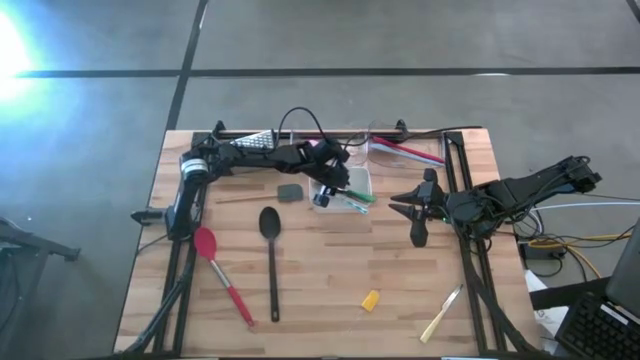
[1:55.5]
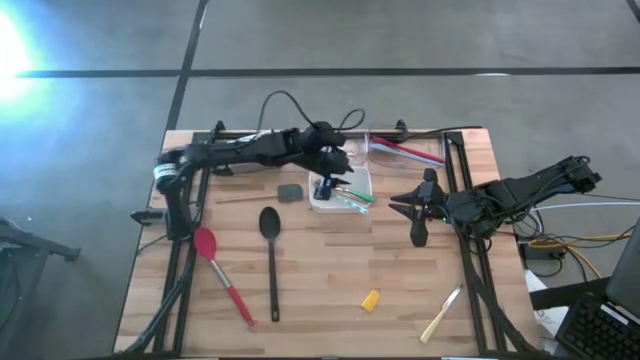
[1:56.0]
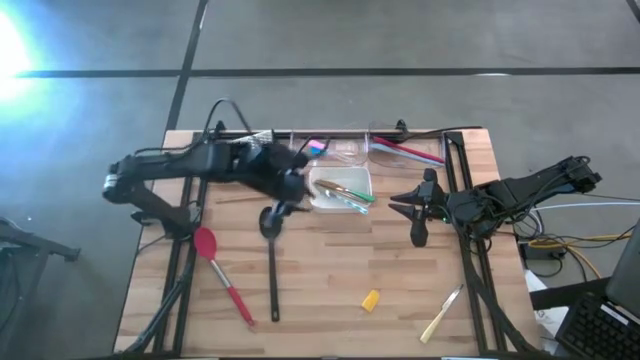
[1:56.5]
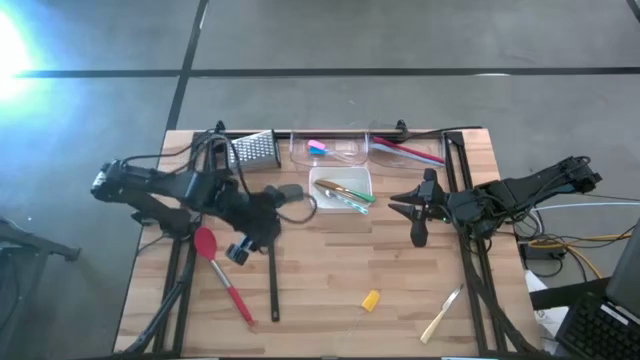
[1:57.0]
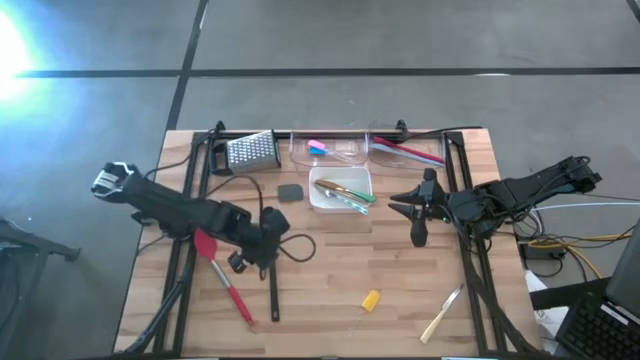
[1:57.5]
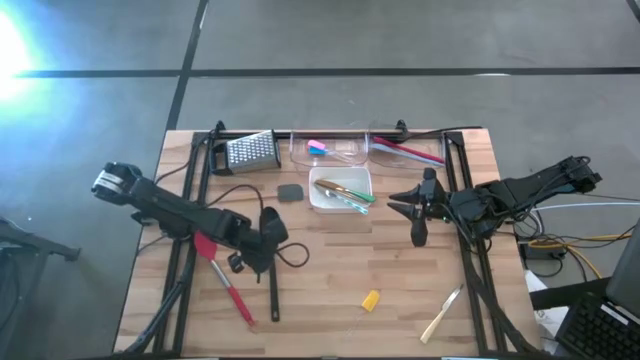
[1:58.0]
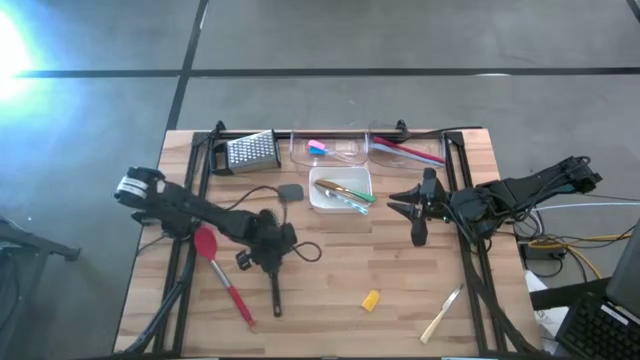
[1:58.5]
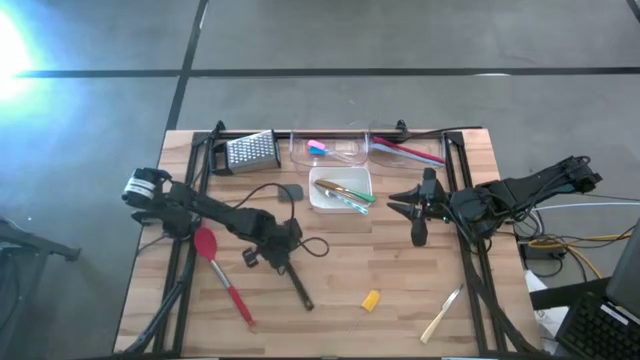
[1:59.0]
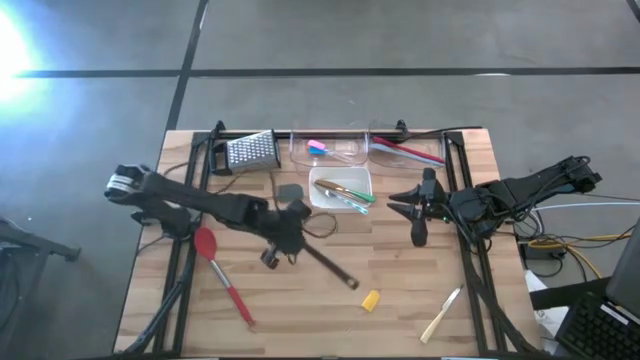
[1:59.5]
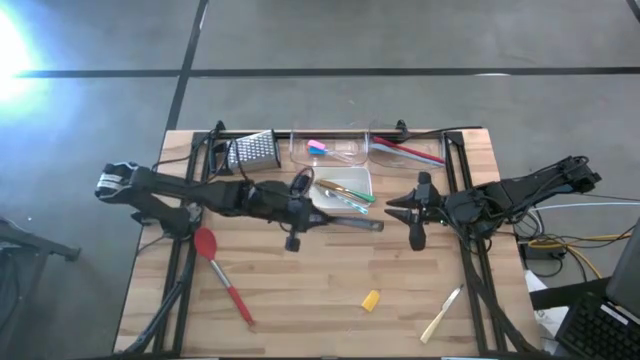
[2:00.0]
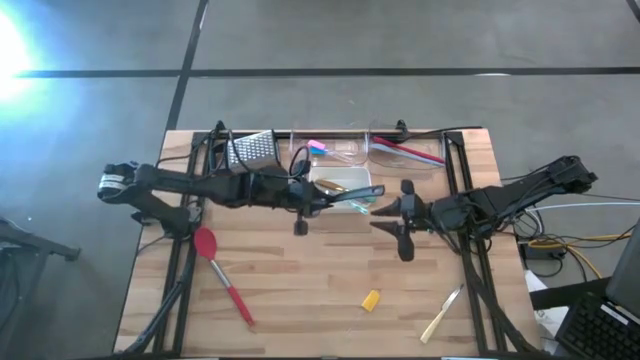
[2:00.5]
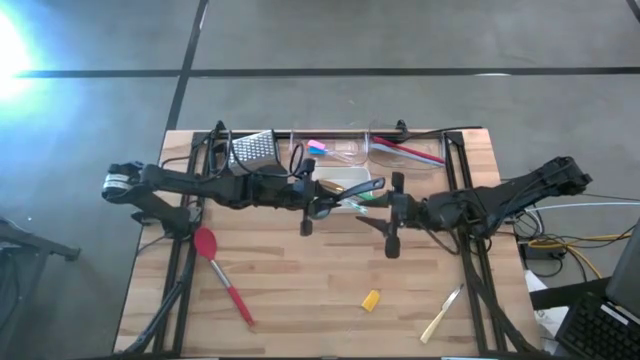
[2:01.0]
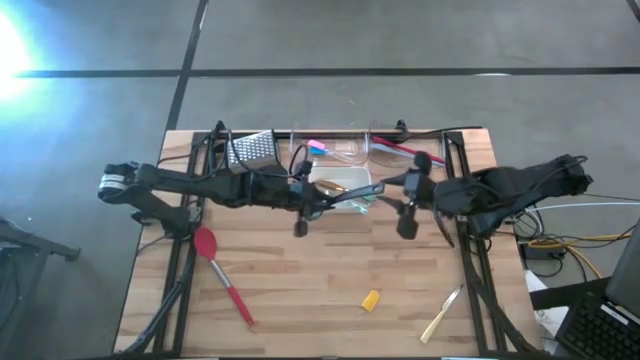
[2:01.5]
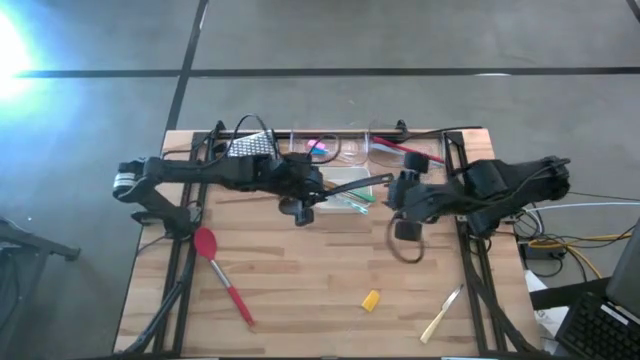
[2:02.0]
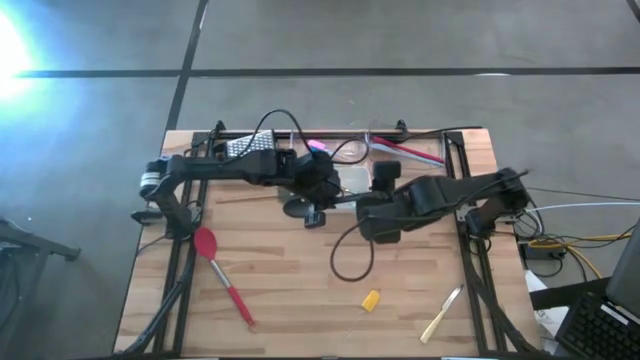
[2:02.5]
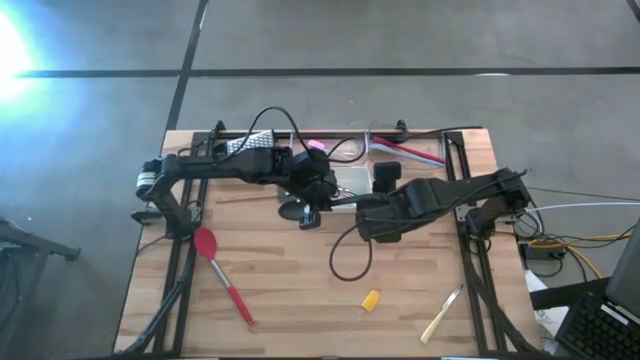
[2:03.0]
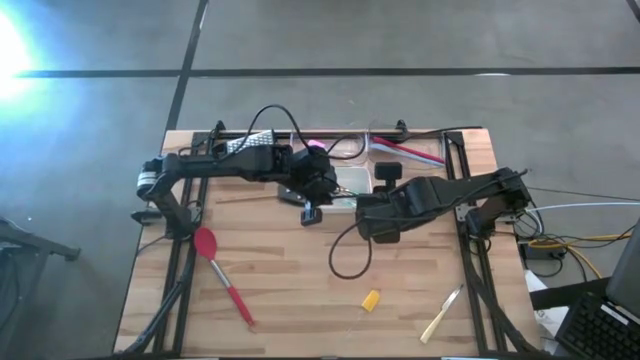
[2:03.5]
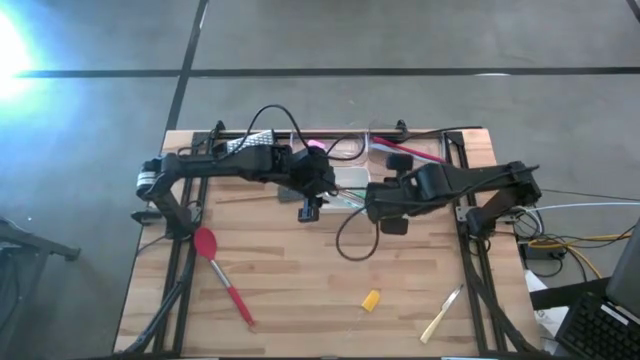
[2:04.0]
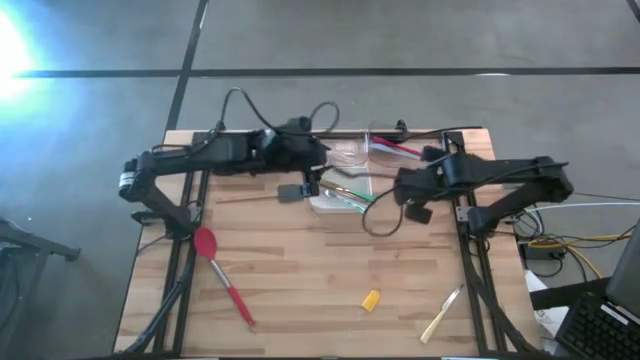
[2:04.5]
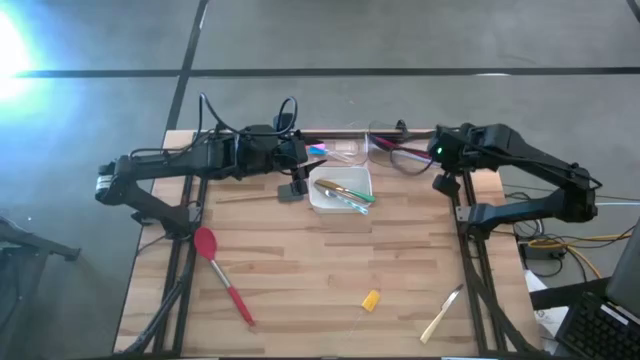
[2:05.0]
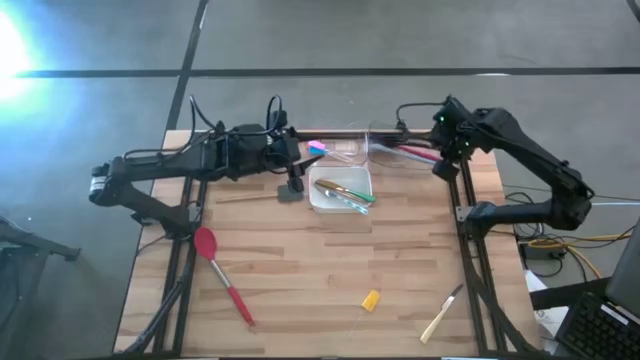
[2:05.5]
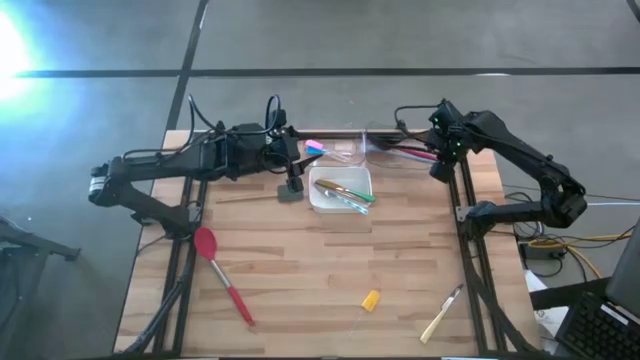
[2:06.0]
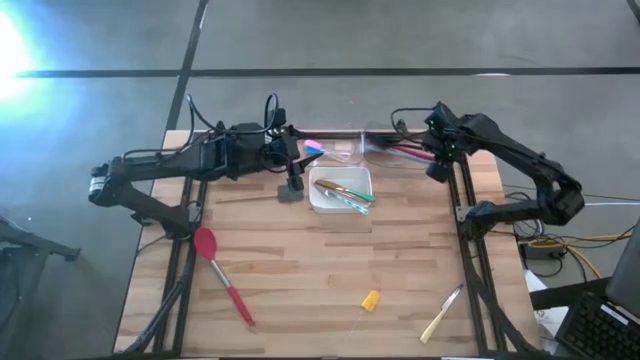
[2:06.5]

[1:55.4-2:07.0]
Task: Pick & Place Kitchen Items
Put the black serving spoon into the right transparent bin

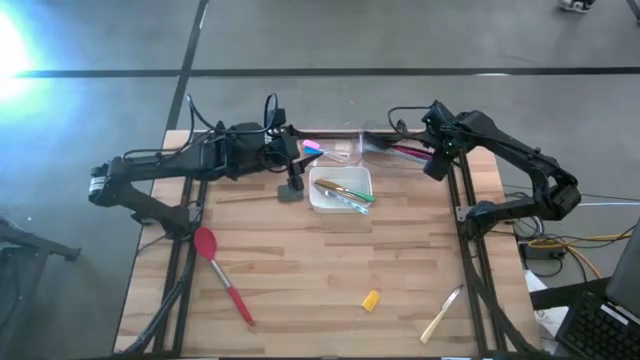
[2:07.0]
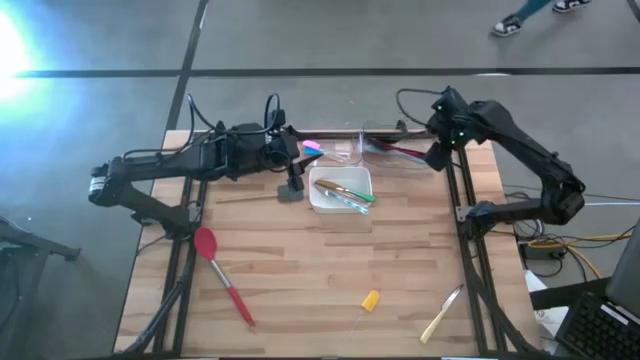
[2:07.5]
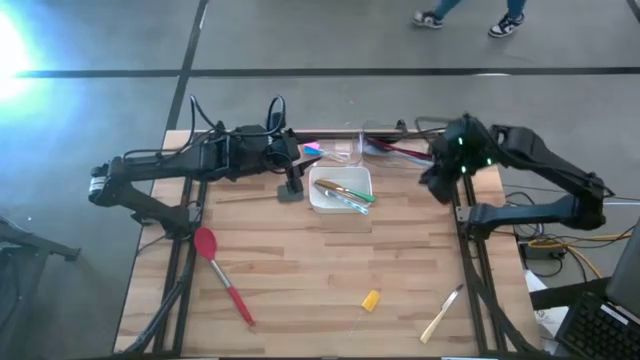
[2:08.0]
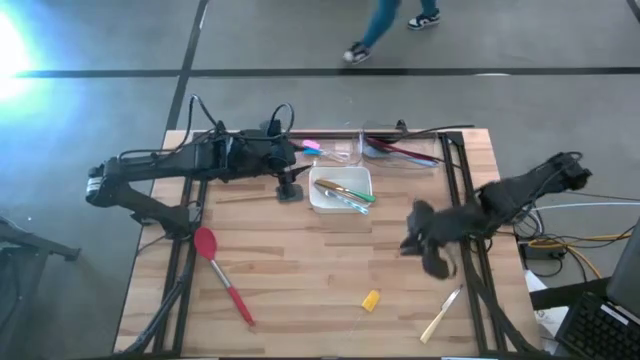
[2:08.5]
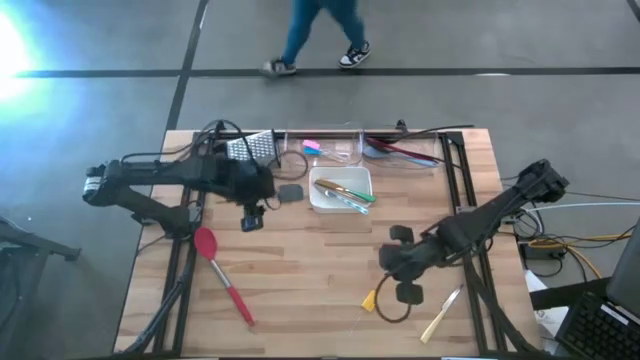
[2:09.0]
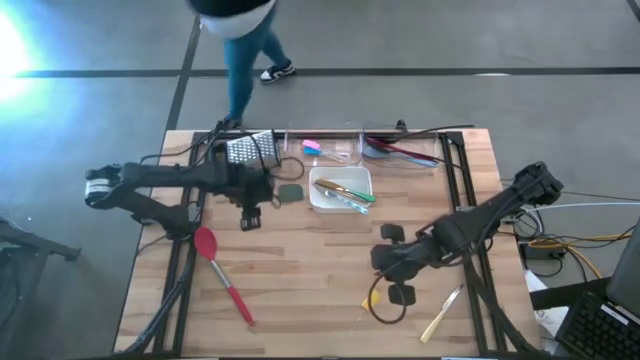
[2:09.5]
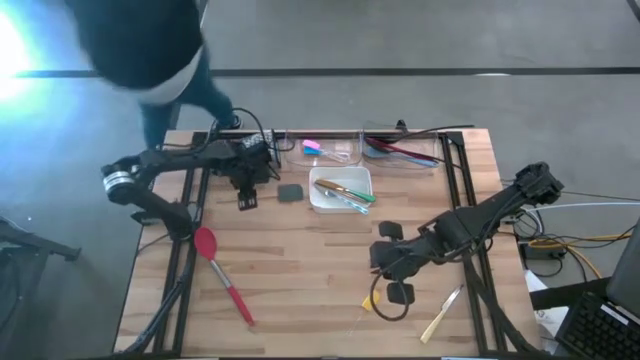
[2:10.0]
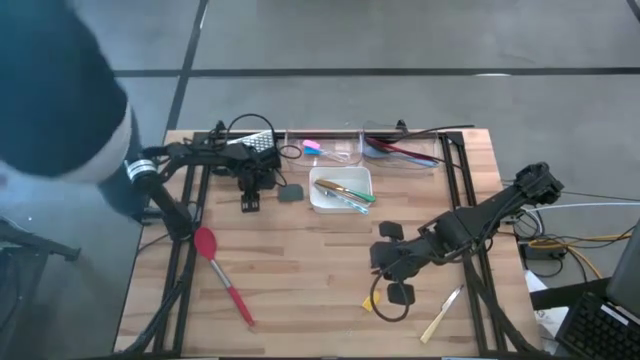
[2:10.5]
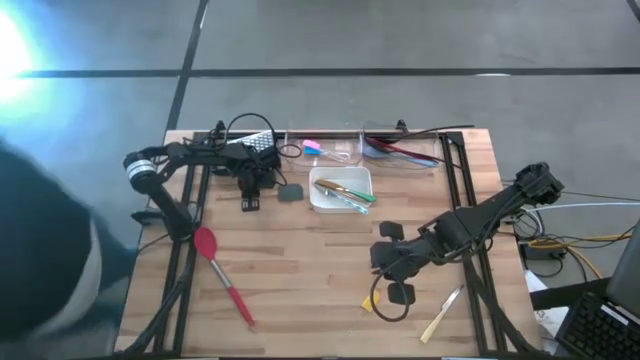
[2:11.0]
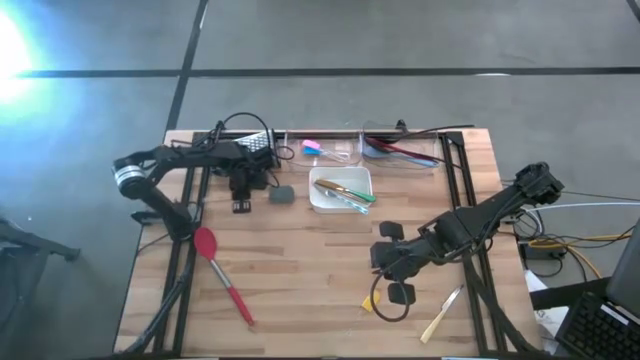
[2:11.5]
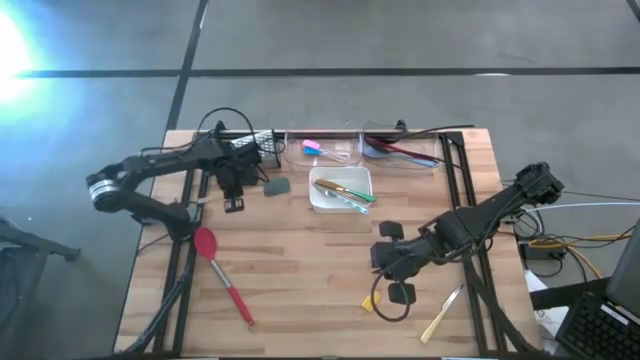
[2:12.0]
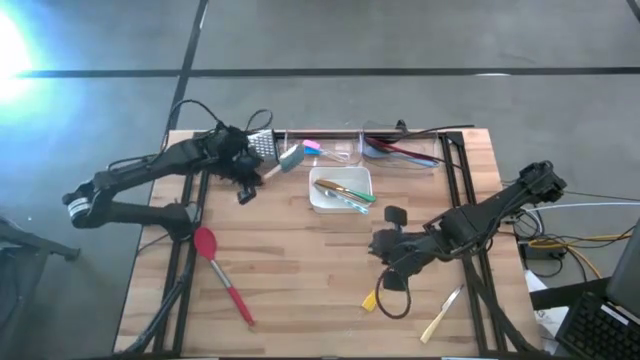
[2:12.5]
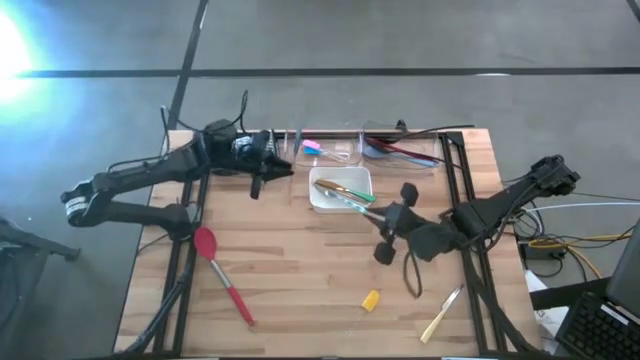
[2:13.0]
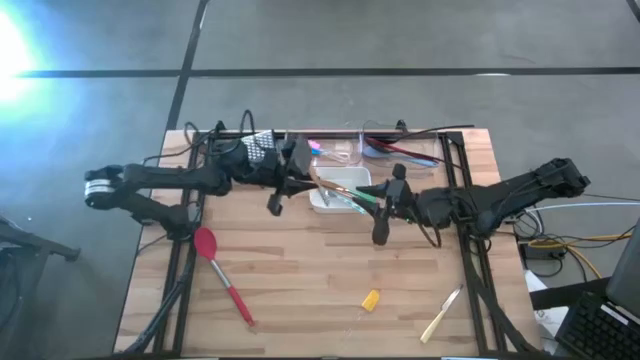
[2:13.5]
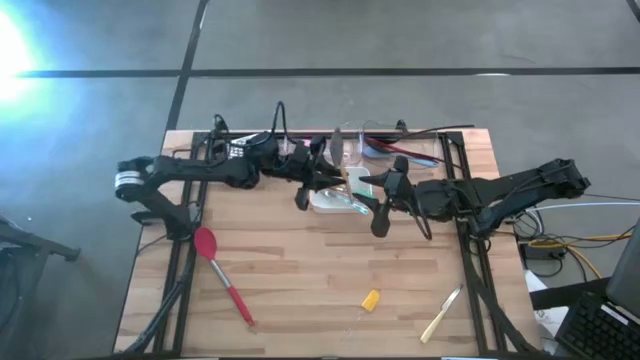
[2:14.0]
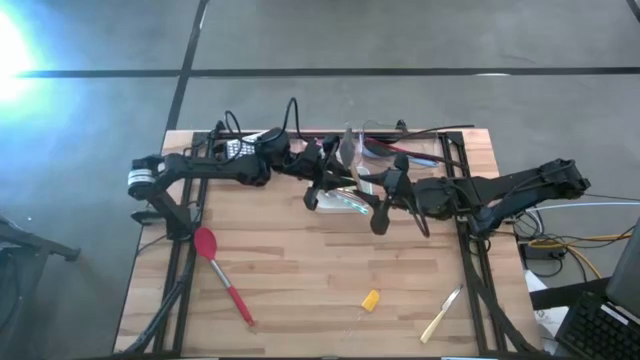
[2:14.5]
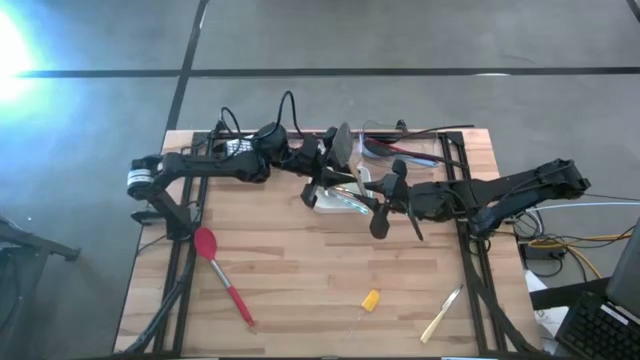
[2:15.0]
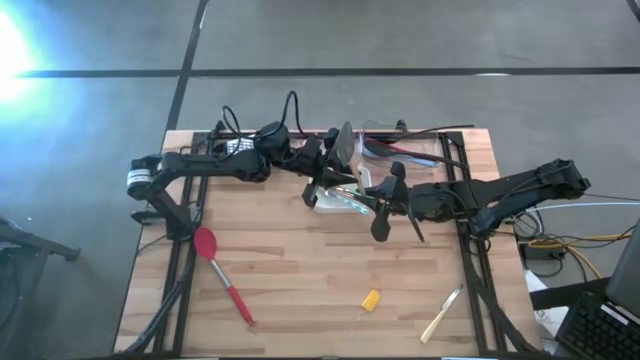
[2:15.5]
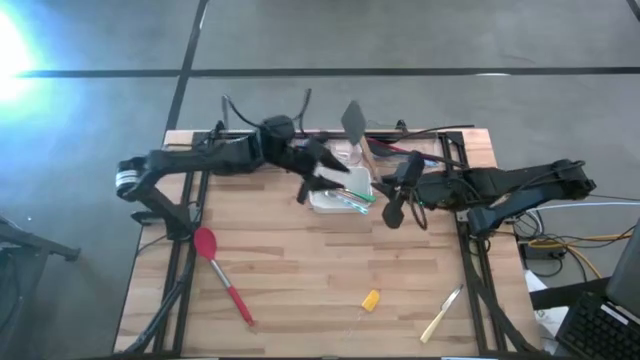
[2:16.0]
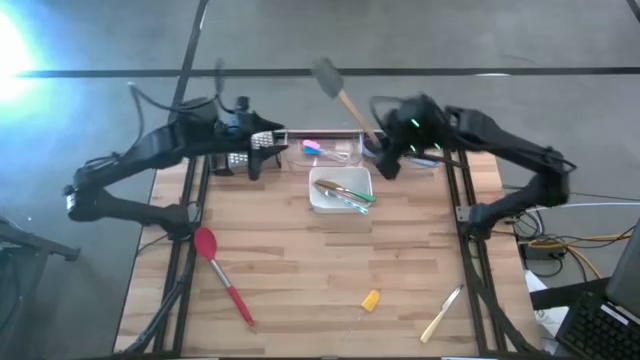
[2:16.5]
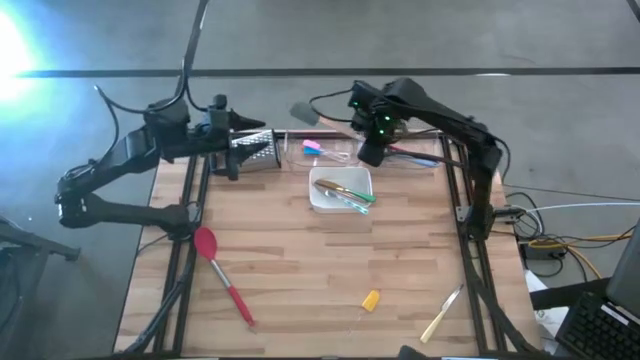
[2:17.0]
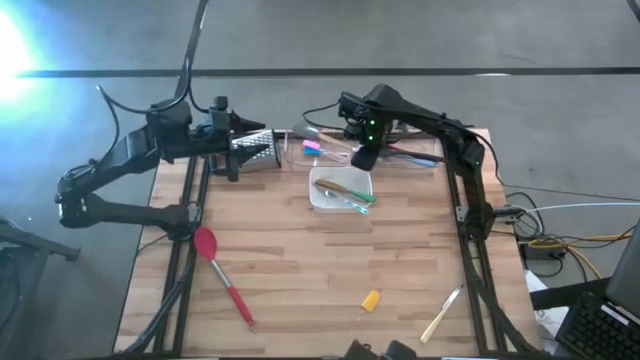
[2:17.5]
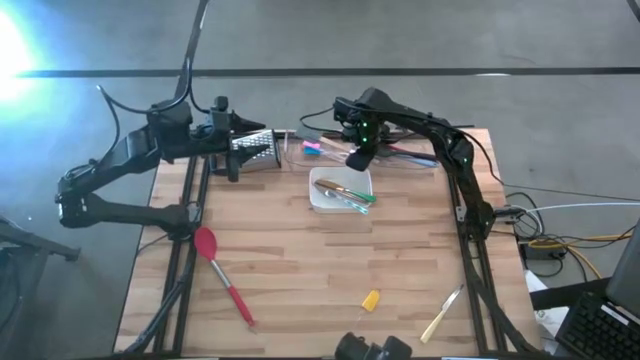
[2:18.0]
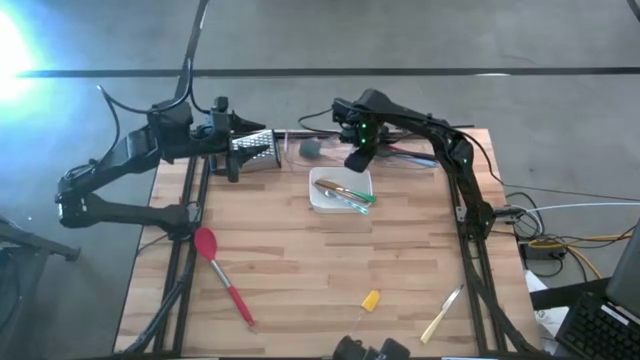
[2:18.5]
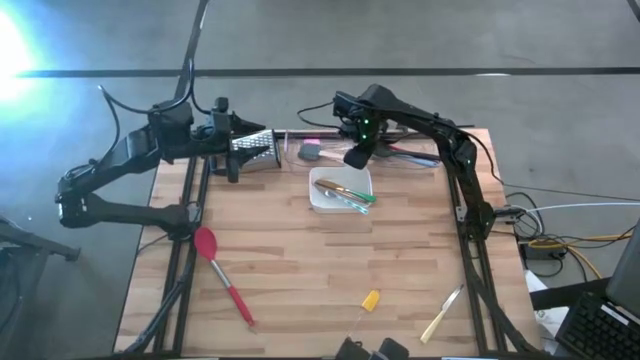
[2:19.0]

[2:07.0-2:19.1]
Put the gray spatula into the left transparent bin
